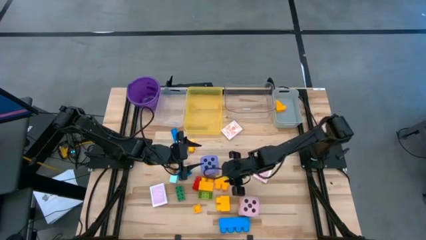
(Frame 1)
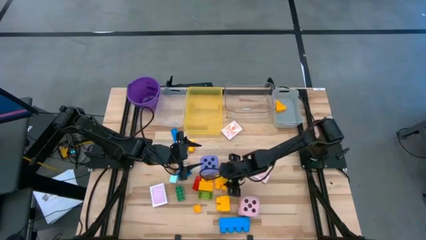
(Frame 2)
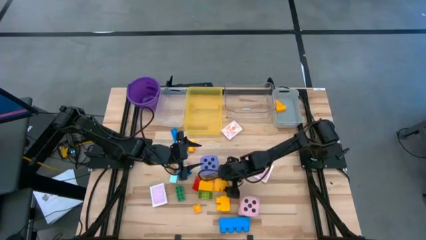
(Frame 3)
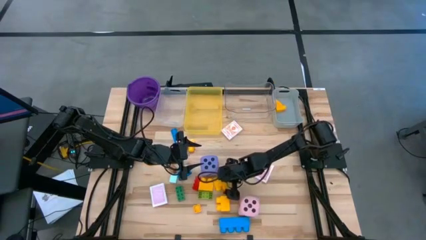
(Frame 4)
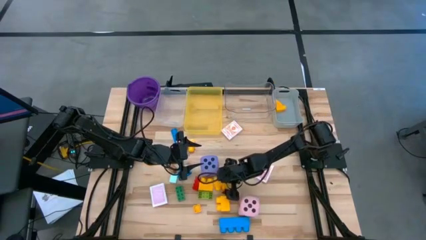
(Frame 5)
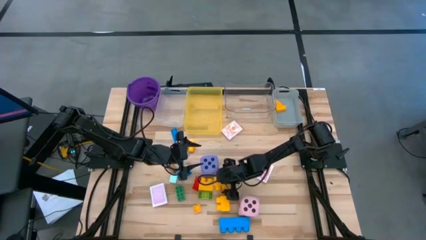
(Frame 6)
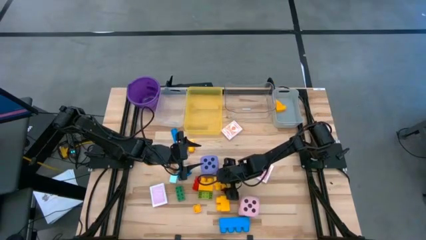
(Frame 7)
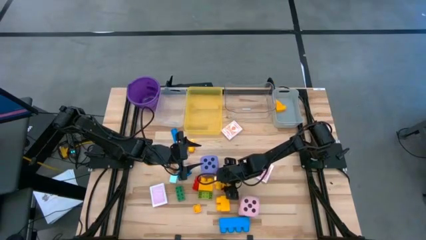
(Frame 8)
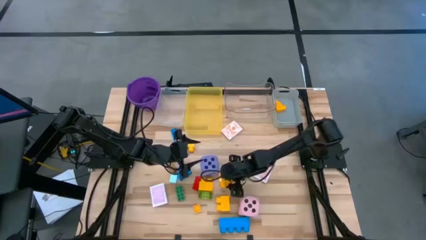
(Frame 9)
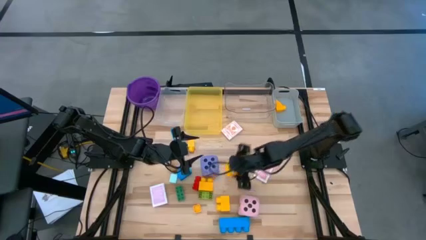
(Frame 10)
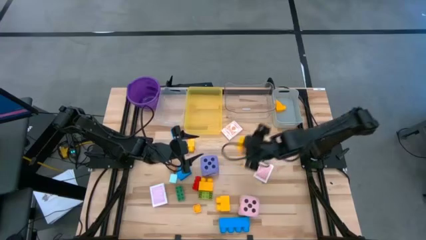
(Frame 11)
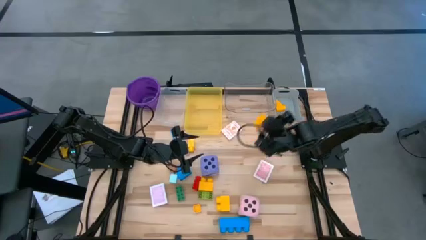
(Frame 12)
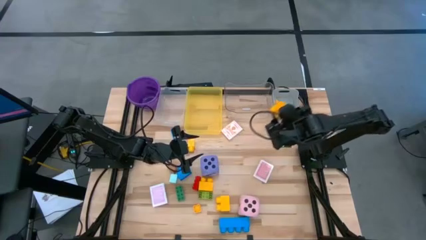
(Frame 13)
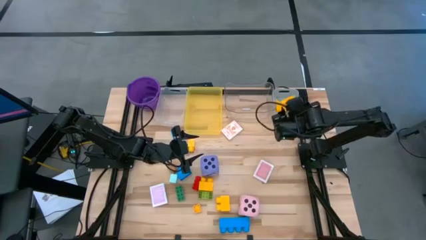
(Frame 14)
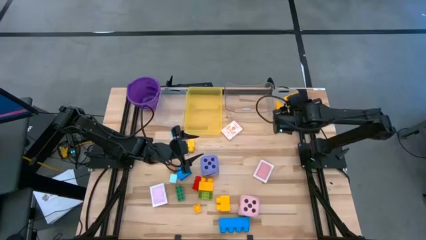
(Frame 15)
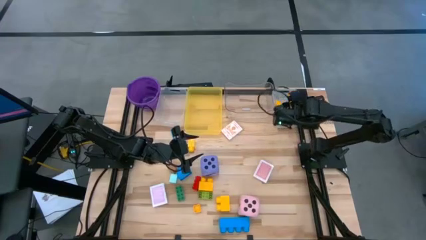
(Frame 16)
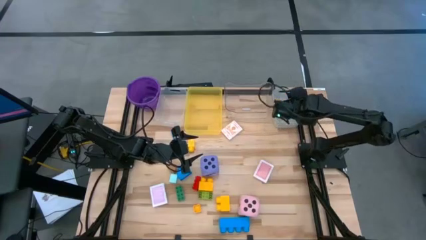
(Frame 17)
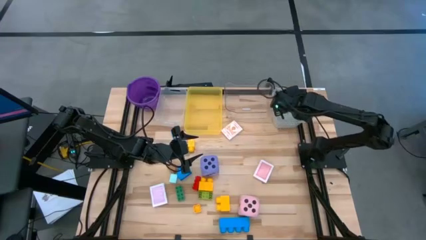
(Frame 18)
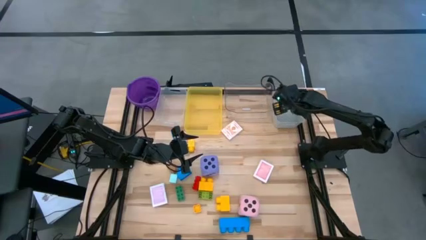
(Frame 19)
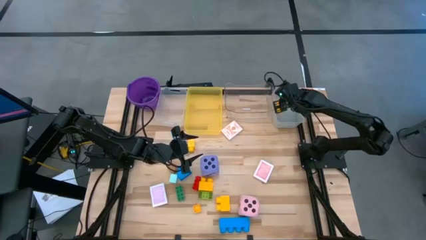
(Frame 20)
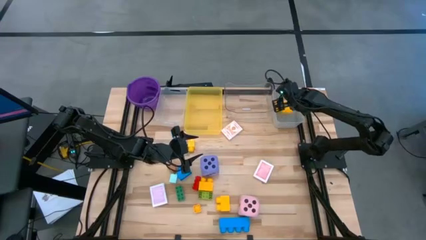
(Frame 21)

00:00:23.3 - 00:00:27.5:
Task: Pick & Place Toys
Put the large yellow game piece into the gray bin

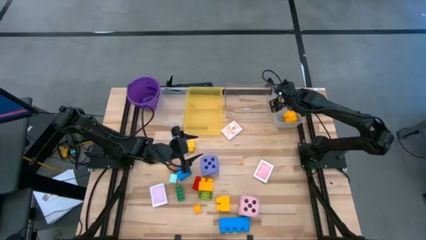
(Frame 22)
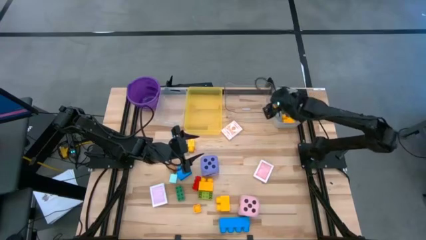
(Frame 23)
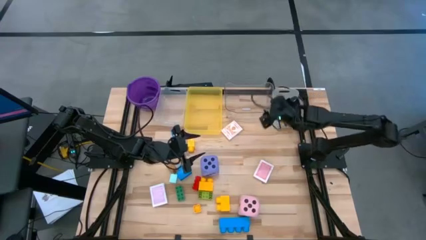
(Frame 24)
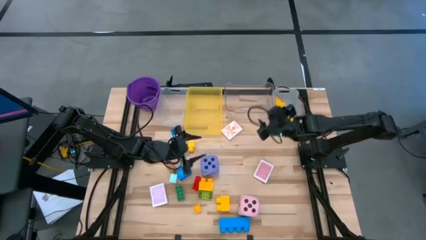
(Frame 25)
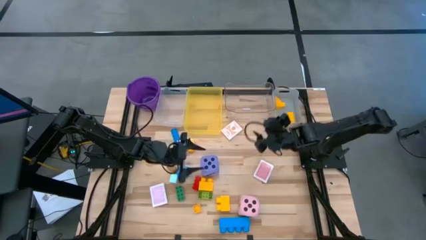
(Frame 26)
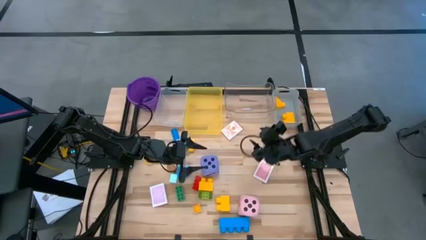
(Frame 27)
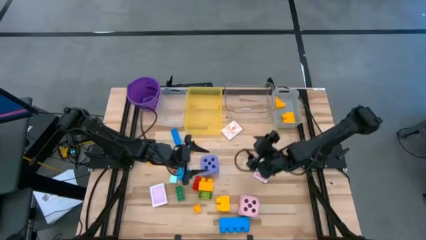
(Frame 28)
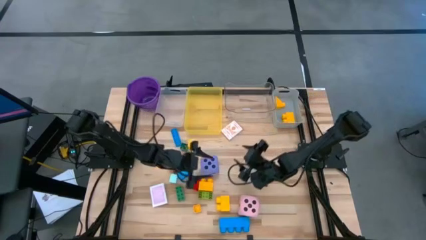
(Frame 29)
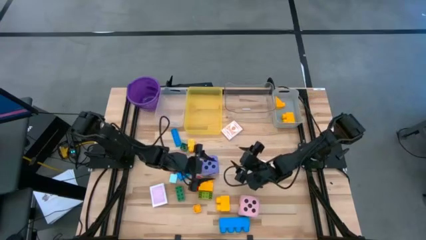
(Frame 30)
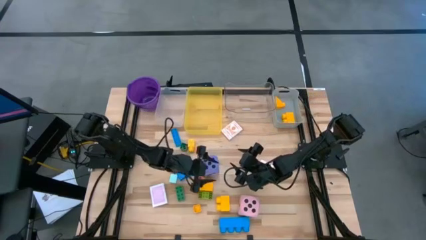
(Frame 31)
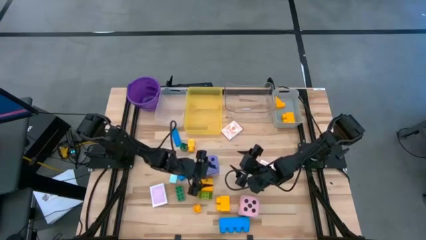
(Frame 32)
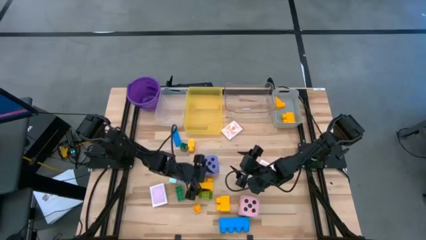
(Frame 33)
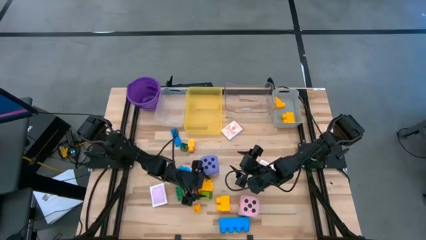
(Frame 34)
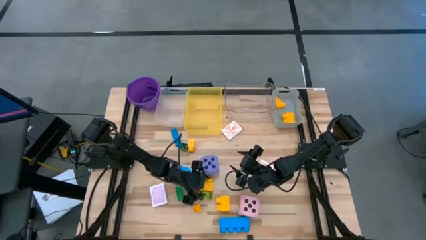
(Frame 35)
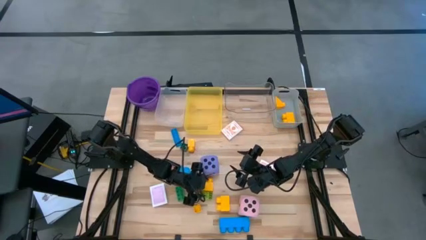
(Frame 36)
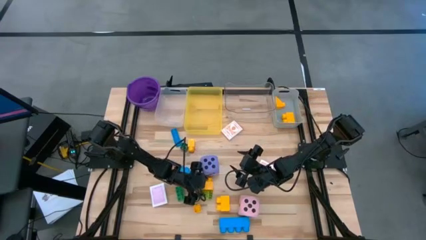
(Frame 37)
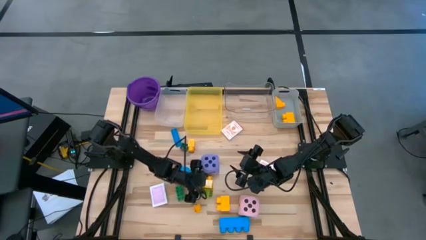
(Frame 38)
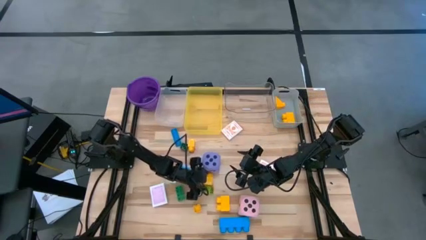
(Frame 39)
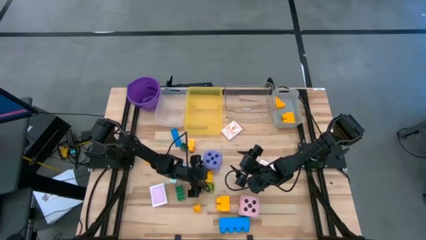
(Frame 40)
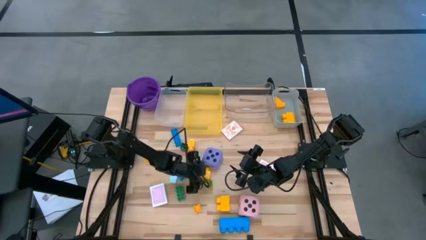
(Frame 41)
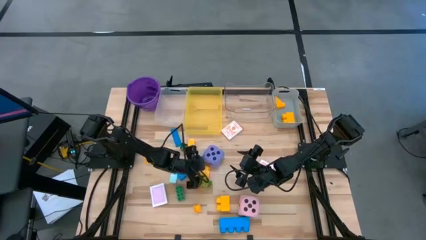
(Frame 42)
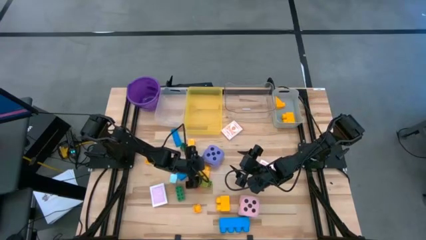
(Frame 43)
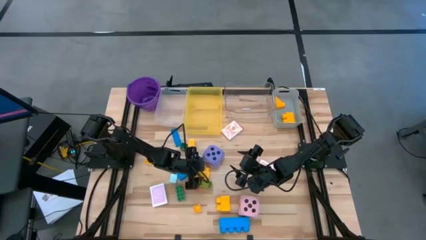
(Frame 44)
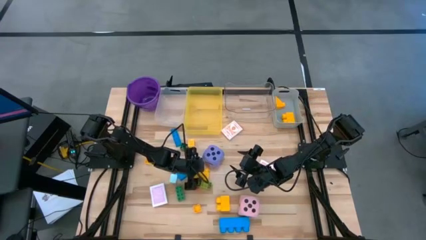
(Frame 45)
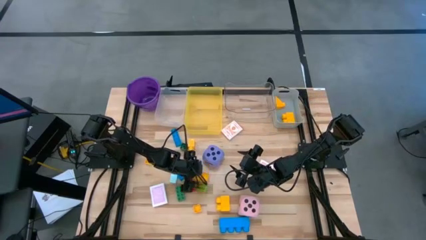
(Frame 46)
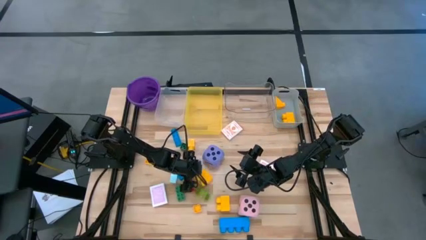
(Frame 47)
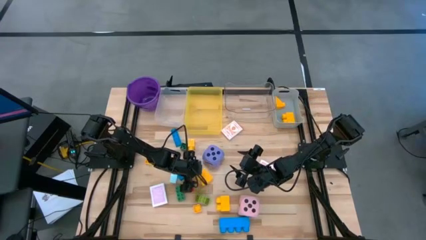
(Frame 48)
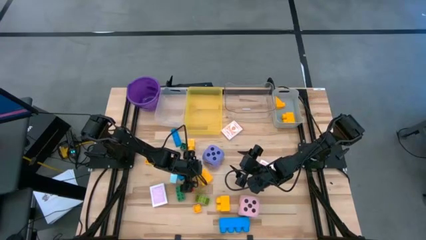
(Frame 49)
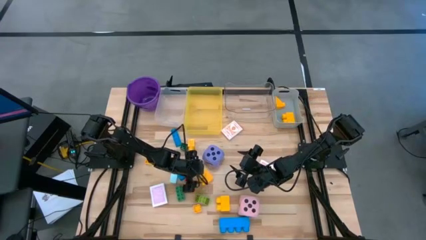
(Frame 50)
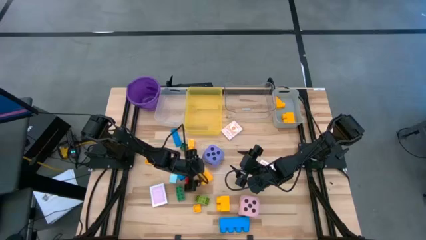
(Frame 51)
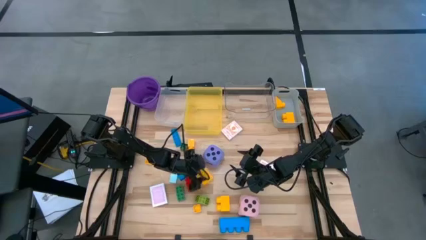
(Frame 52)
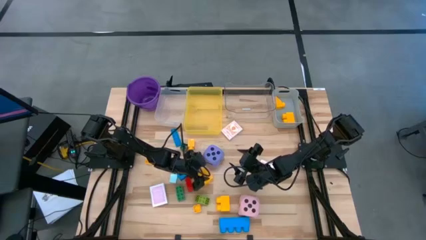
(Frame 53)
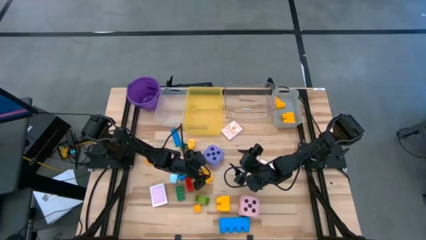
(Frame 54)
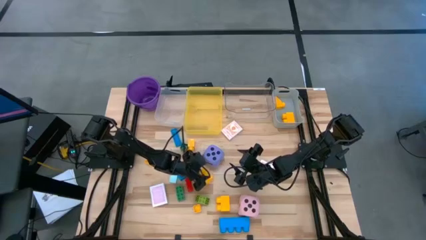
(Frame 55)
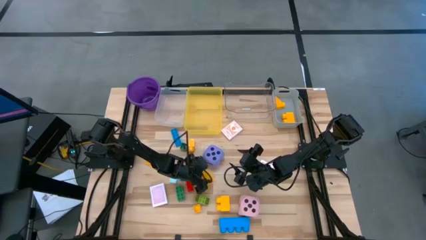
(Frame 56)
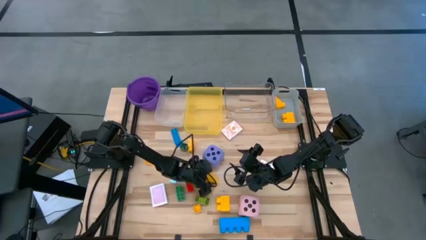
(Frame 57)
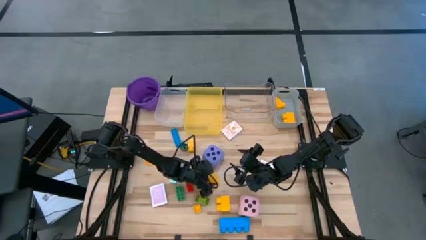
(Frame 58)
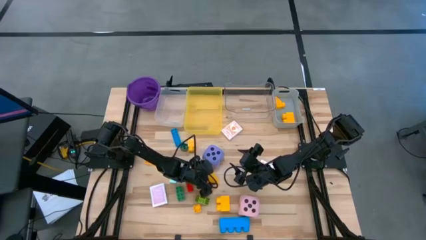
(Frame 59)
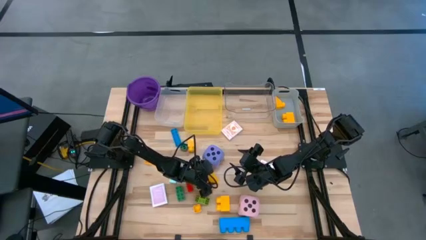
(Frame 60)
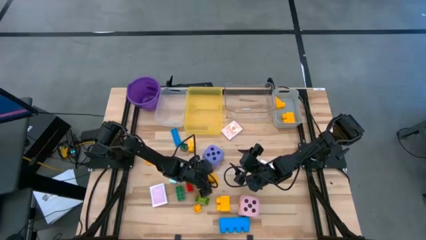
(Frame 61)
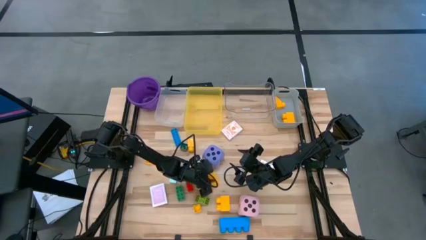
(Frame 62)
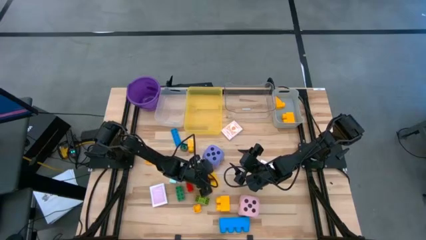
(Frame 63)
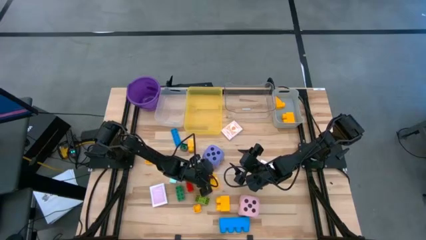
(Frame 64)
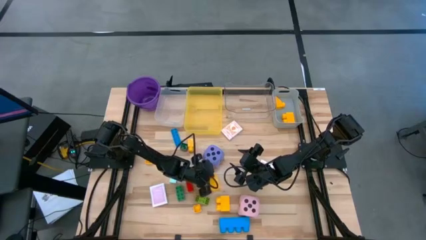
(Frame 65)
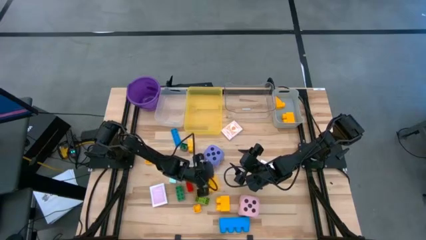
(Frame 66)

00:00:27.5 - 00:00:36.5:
Put the large yellow game piece into the gray bin

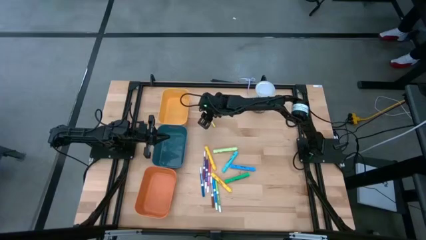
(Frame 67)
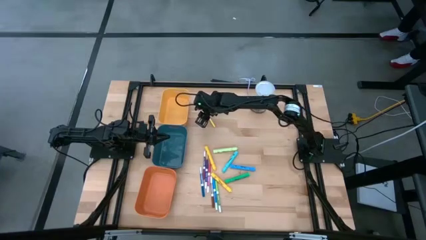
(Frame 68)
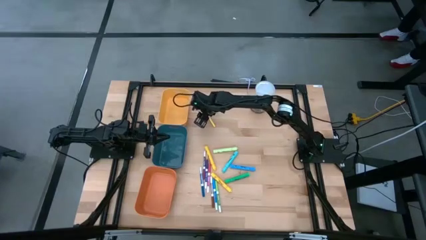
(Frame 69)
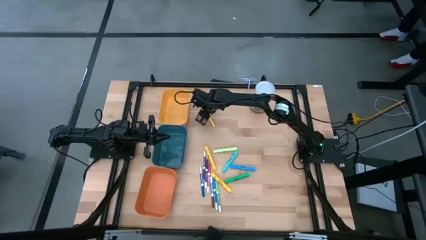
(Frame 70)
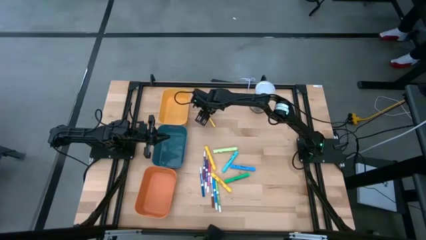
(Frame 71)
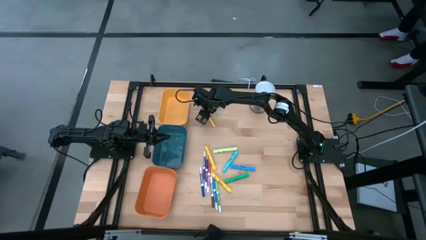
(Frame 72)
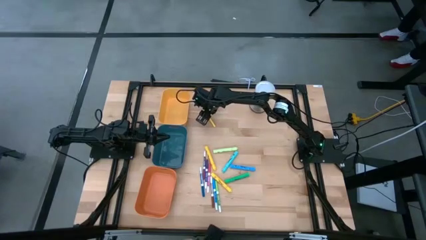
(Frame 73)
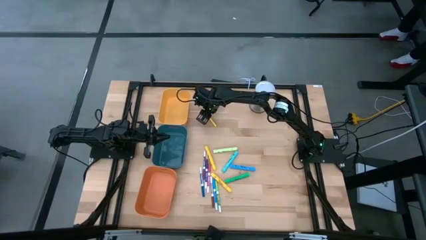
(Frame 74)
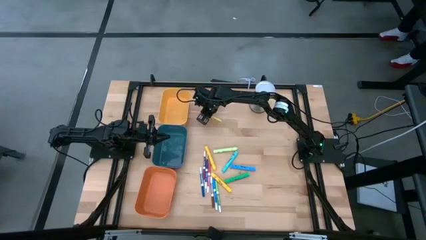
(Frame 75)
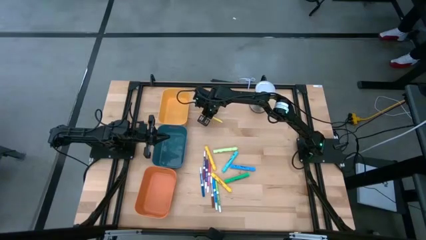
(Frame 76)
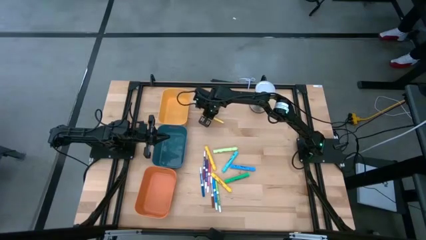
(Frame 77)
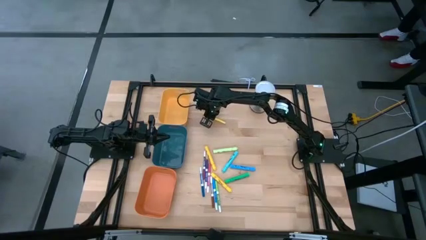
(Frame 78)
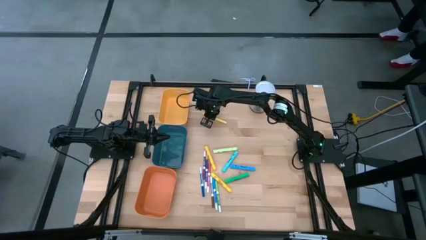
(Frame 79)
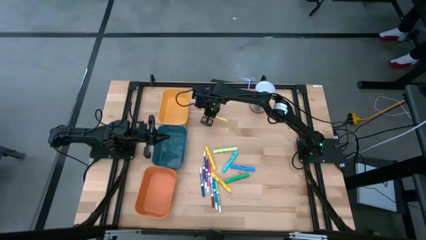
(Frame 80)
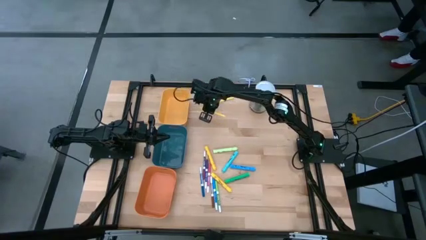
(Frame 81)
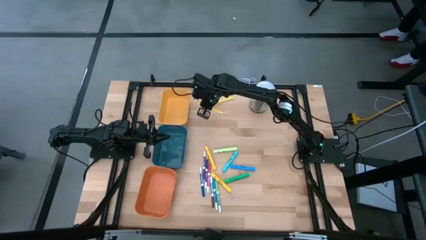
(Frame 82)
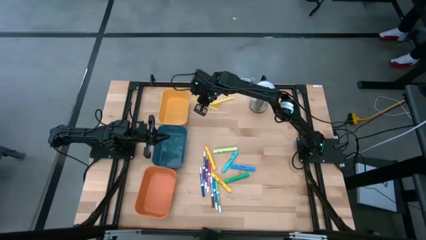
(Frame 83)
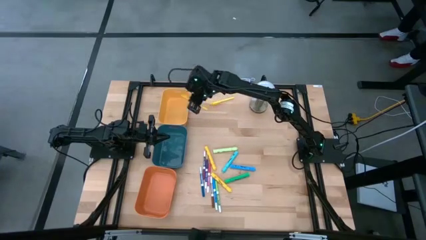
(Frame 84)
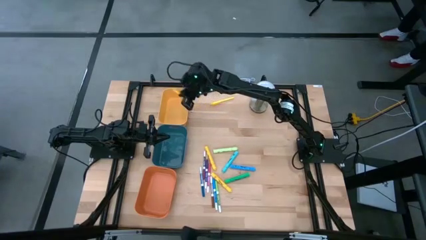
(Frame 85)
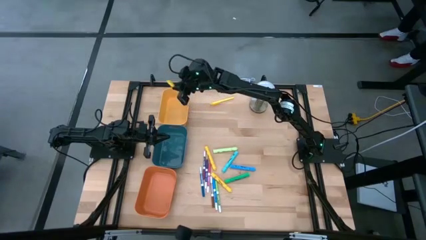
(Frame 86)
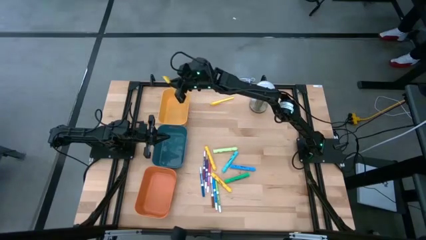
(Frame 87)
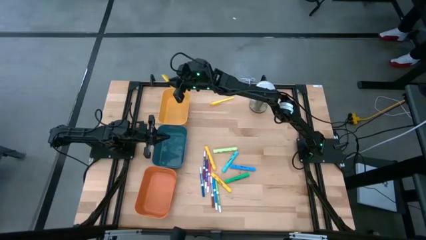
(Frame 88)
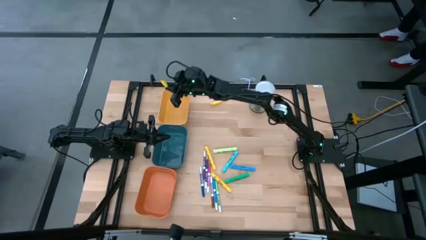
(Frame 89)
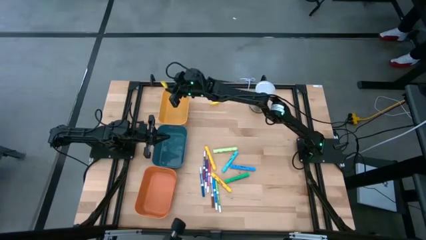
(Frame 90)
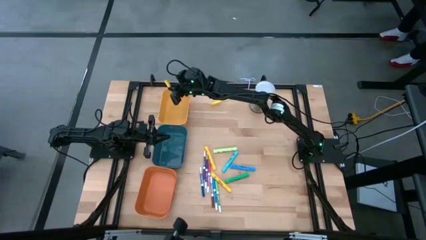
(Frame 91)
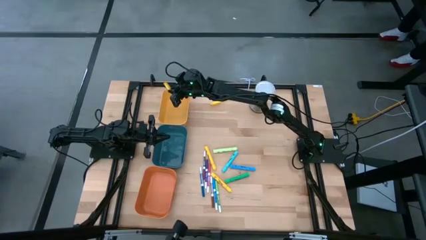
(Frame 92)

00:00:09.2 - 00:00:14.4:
Task: Pick & Place Markers
Put the bottom yellow highlighter pen into the yellow bin
